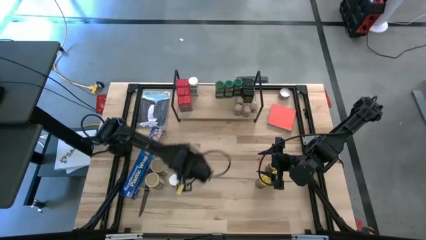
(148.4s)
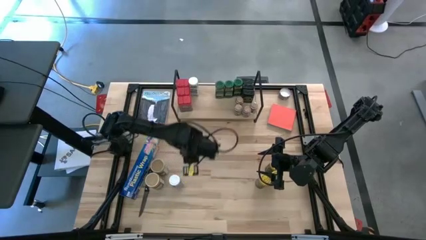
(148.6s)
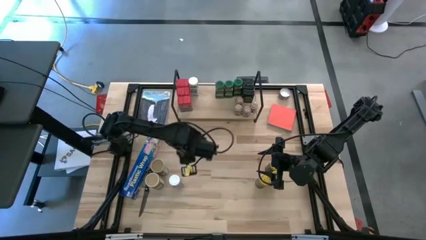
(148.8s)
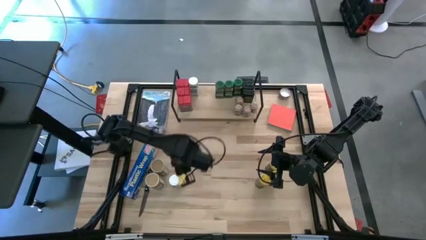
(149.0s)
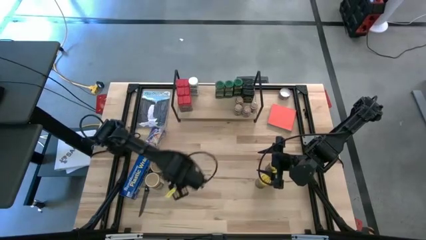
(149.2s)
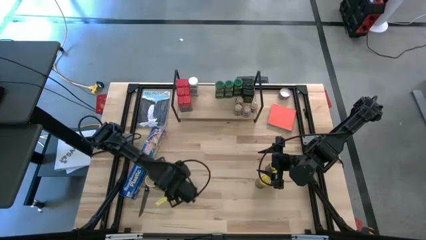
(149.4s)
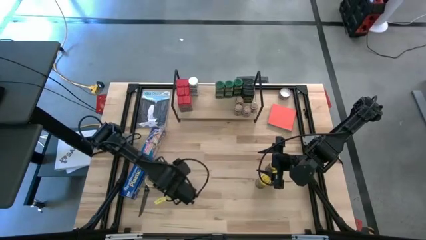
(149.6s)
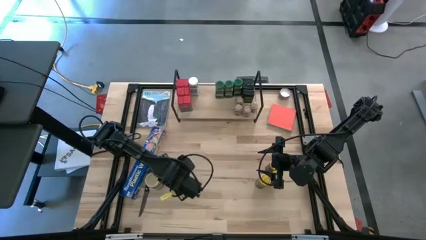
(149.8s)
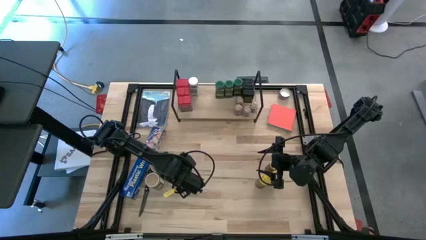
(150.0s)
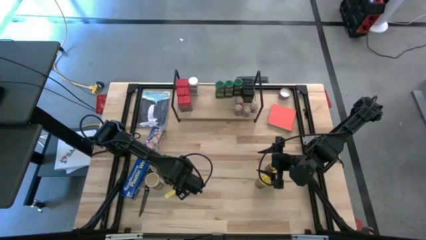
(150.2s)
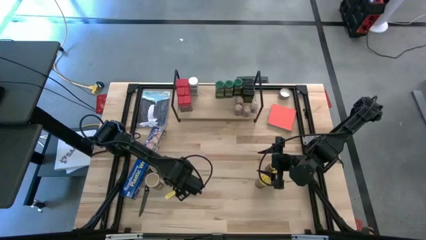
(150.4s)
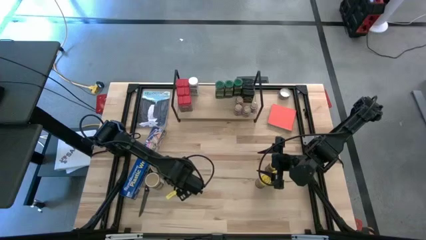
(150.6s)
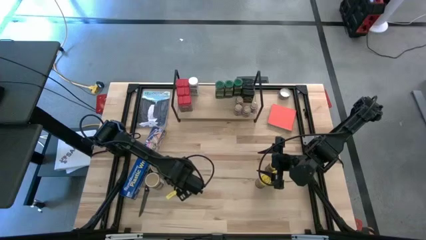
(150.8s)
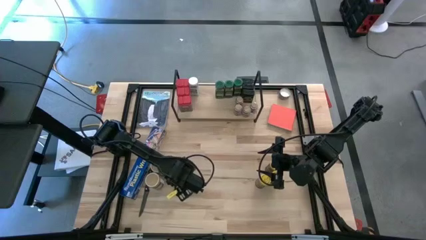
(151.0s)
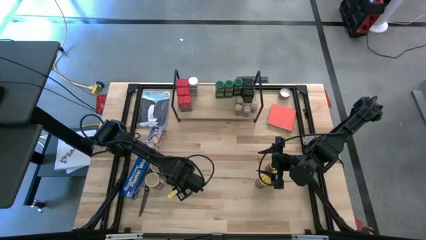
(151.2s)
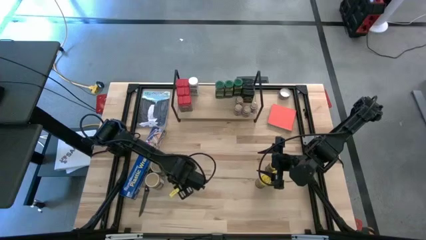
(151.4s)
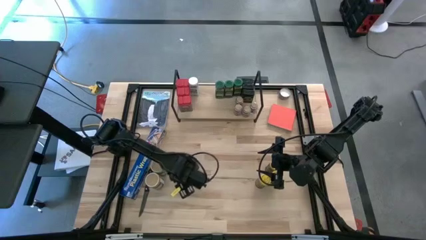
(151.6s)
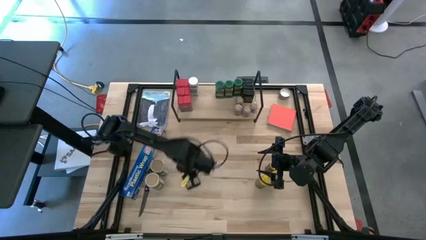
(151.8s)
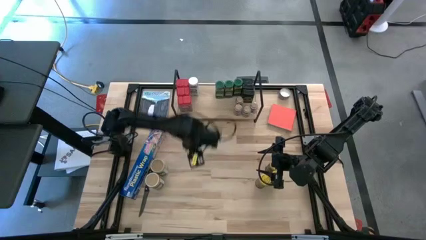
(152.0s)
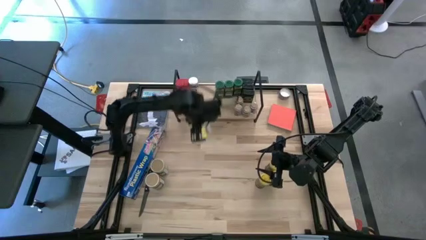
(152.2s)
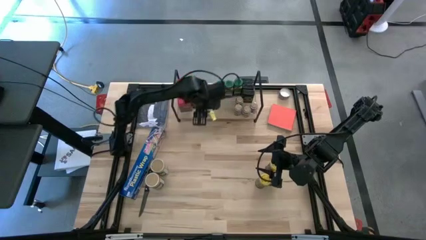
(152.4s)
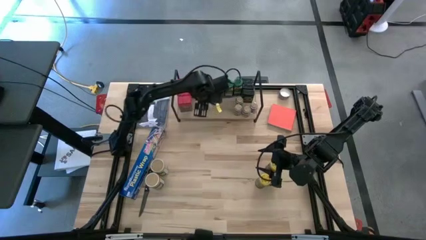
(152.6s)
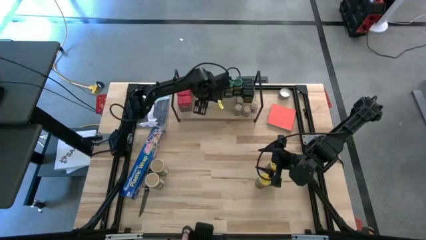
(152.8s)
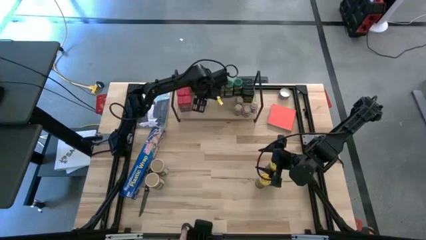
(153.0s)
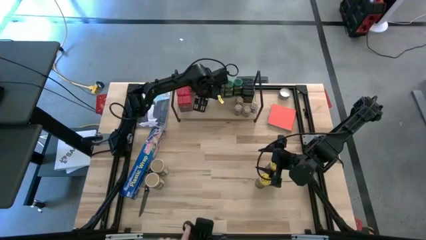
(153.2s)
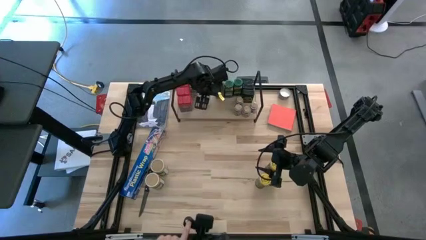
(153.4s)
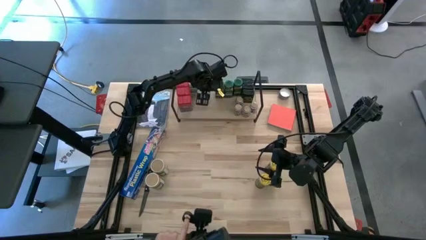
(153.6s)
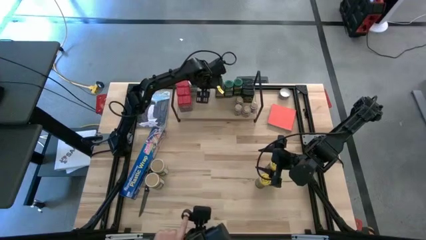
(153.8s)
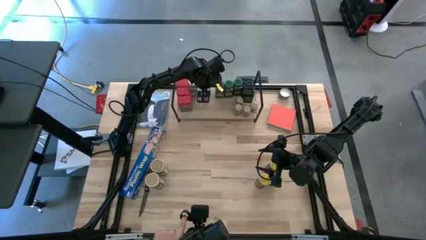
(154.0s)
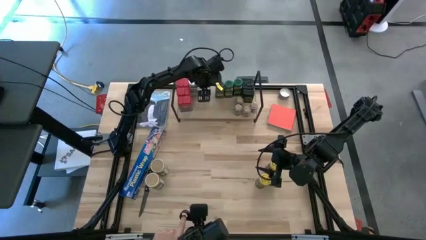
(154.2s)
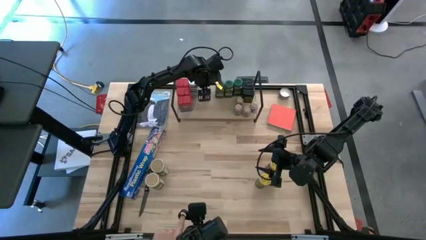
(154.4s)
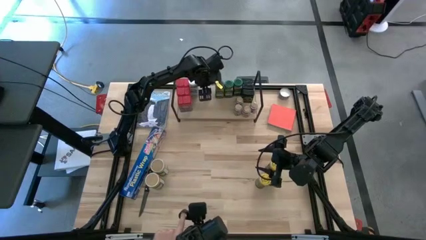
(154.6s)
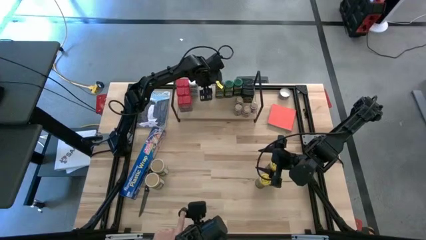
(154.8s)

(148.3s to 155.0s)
Task: Shelf spices
Put the white seasoning bottle on the shelf aligned to he right of the white seasoning bottle

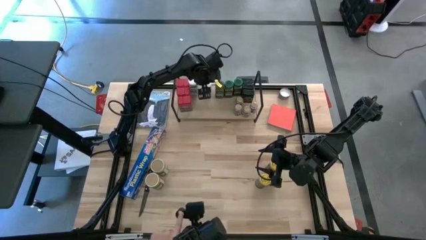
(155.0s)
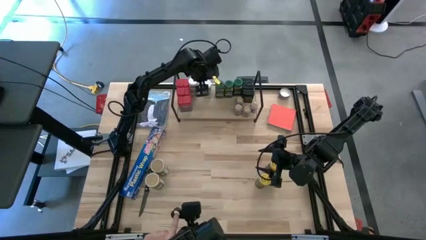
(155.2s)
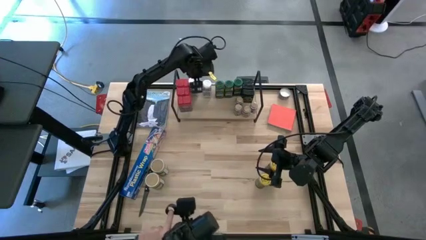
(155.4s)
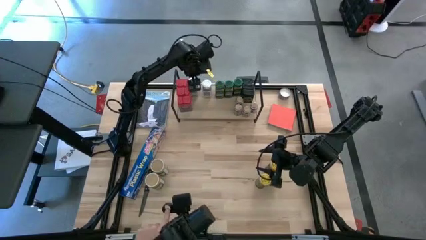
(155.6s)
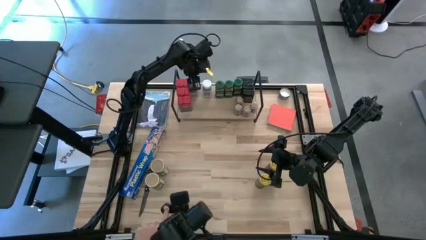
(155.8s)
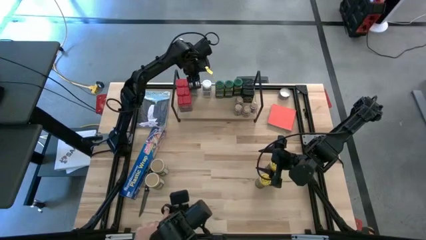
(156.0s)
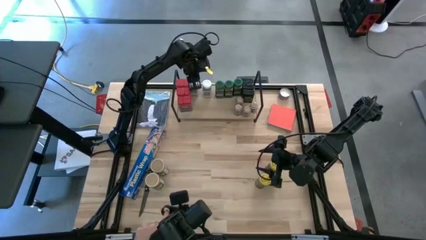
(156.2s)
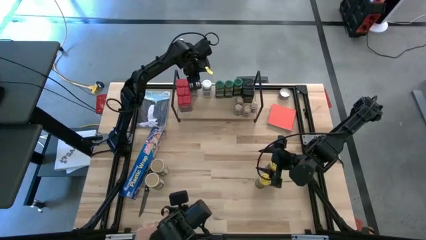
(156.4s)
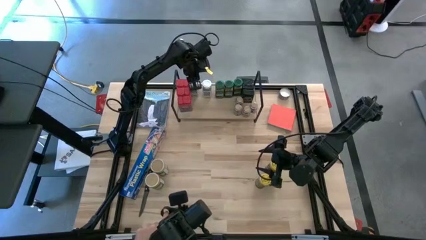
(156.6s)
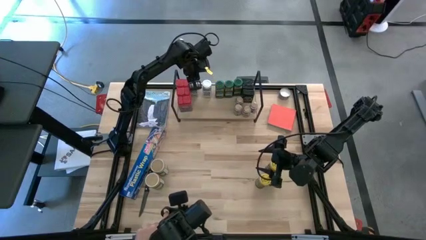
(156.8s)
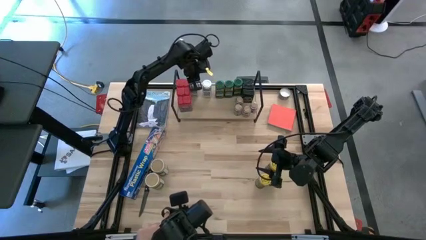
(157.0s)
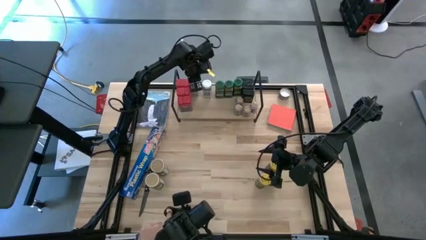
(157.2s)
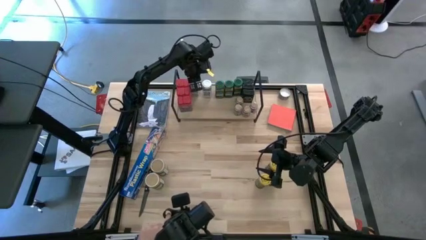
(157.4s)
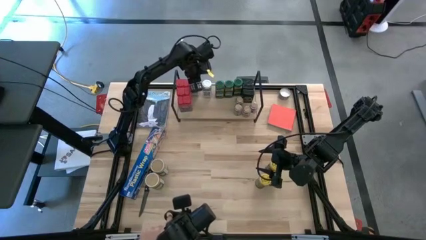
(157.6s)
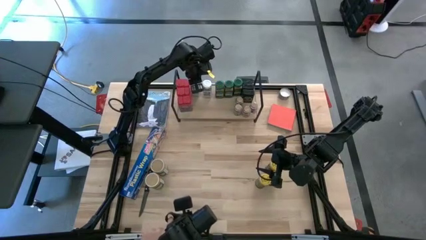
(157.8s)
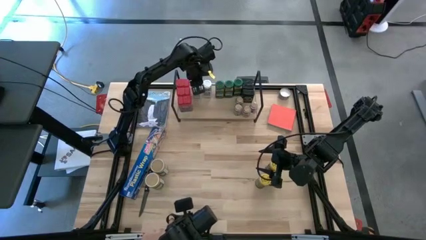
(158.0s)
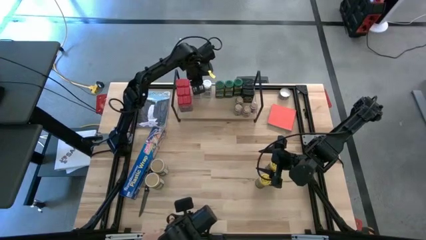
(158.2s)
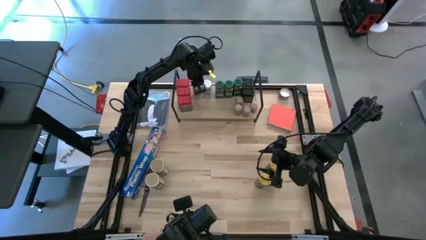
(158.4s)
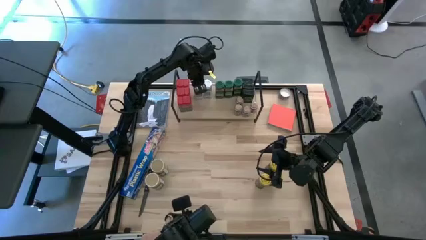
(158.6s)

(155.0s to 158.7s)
Adjust the left white seasoning bottle on the shelf

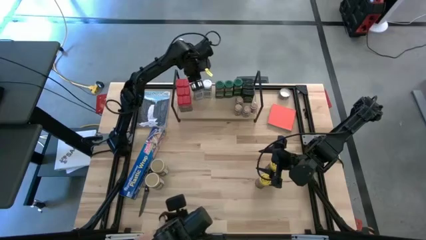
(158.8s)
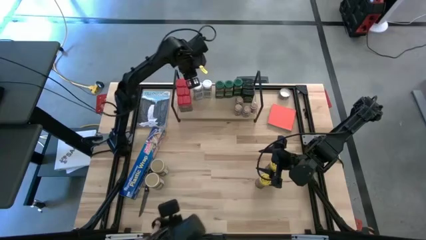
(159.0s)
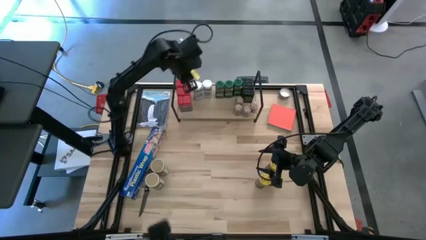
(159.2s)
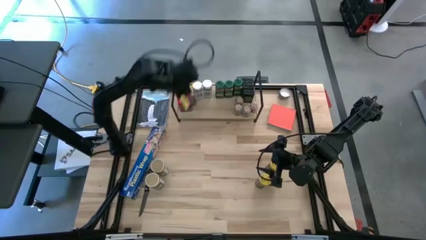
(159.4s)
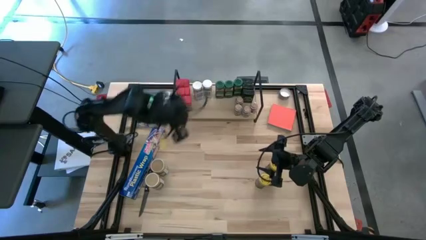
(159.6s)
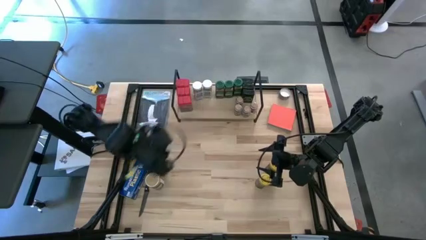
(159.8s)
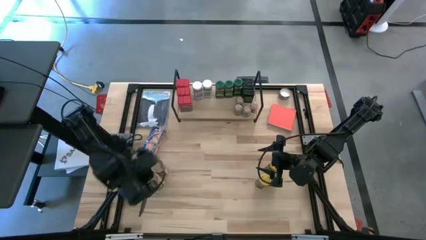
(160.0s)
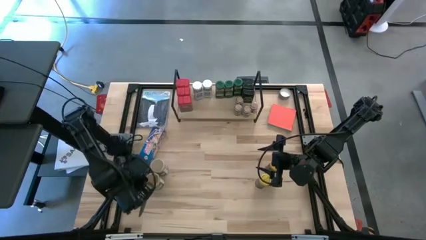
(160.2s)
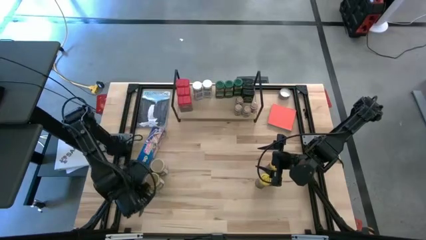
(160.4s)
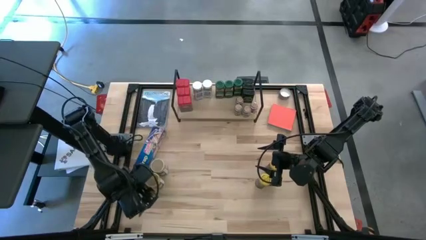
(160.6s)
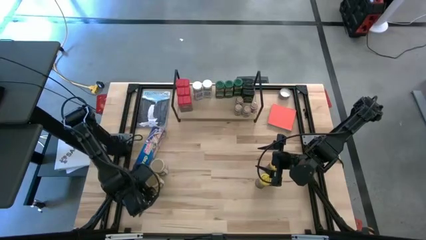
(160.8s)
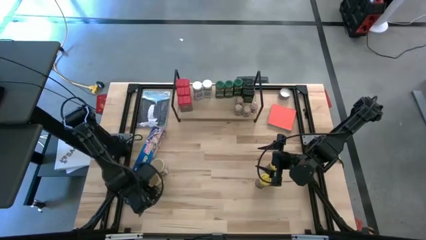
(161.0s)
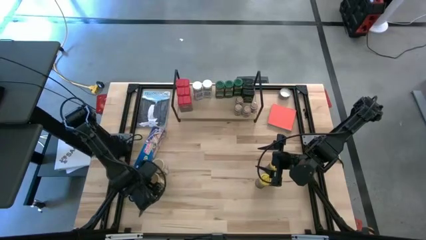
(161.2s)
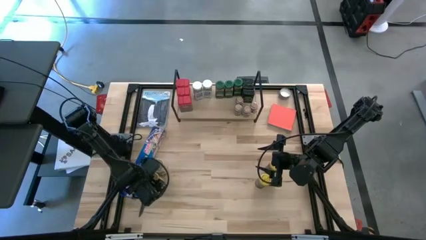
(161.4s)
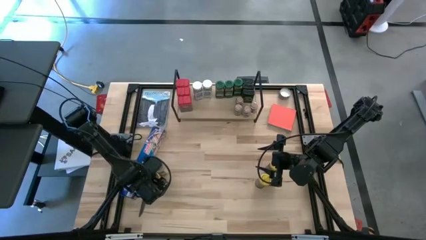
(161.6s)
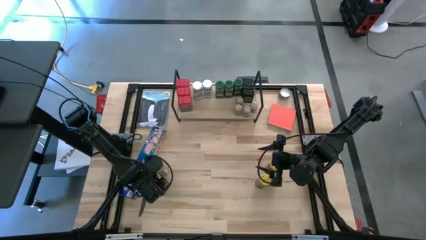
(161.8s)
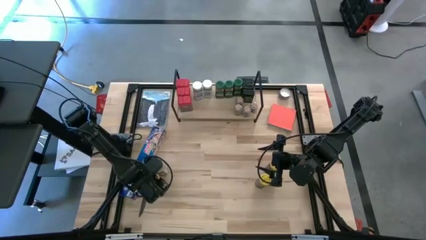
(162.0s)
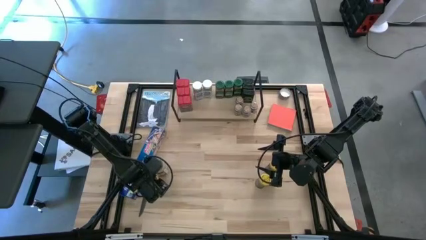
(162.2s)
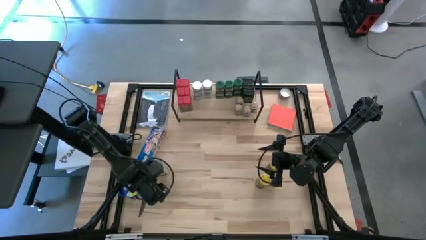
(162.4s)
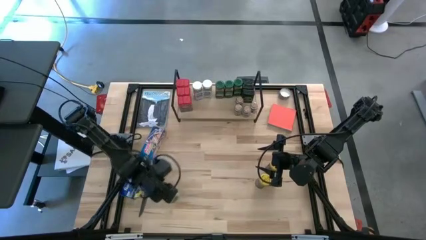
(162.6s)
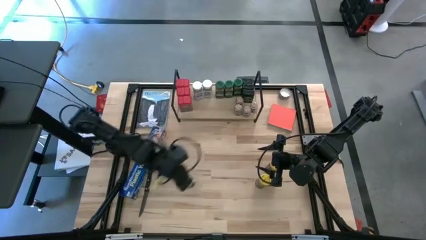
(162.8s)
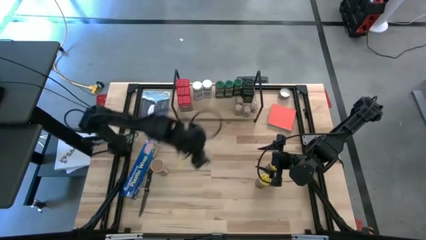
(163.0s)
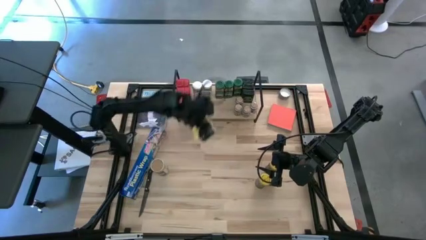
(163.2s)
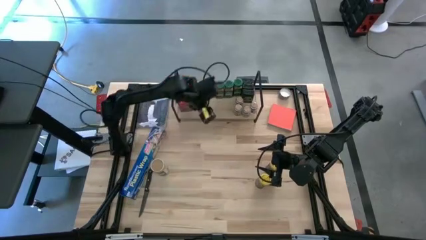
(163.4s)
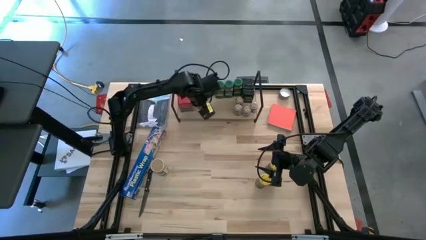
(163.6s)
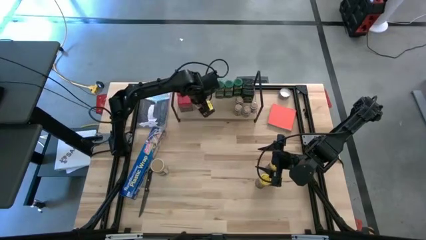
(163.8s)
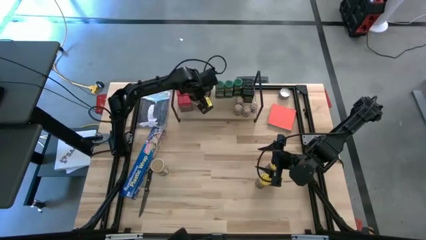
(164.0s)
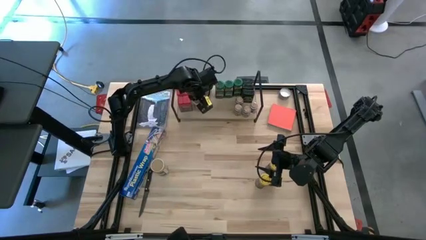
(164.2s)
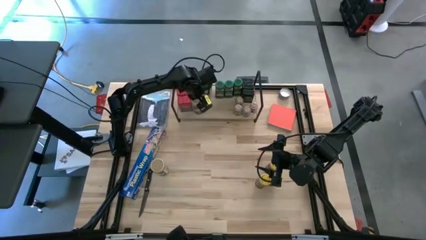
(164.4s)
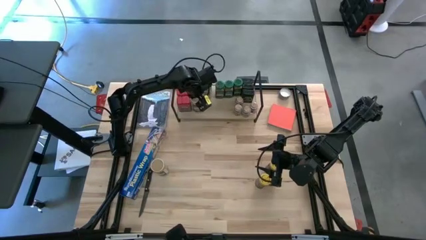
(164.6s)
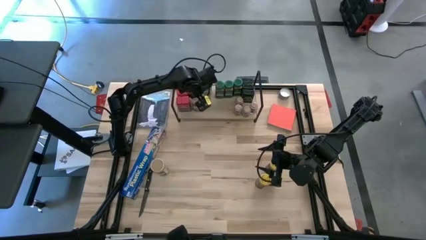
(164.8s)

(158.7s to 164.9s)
Put the bottom brown seasoning bottle on the shelf aligned with the white seasoning bottle
